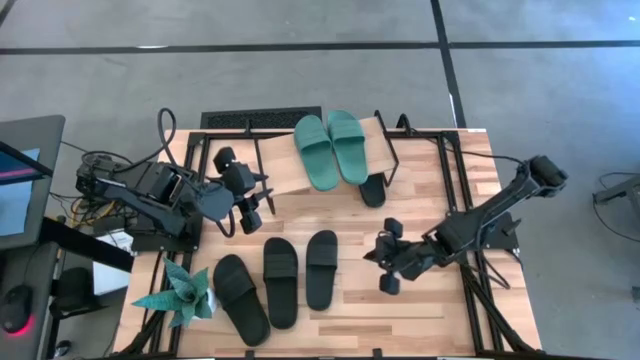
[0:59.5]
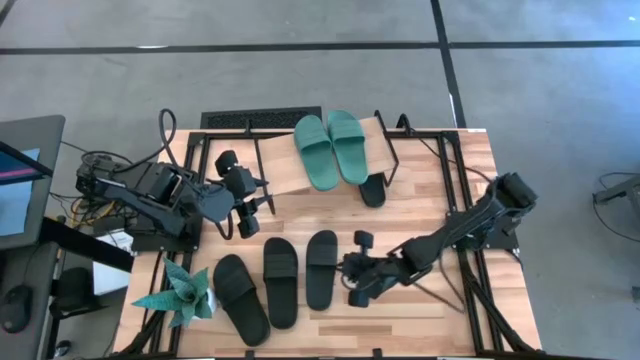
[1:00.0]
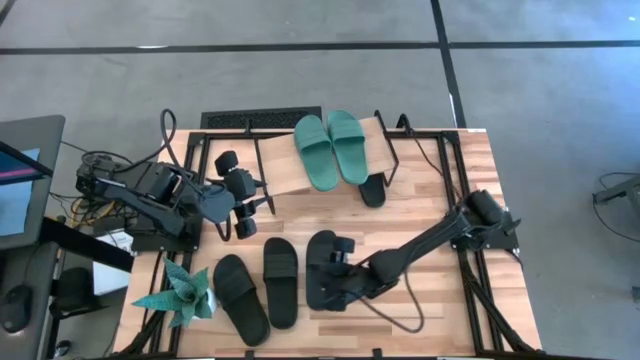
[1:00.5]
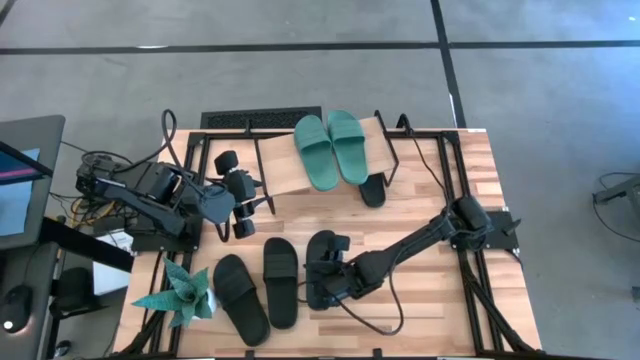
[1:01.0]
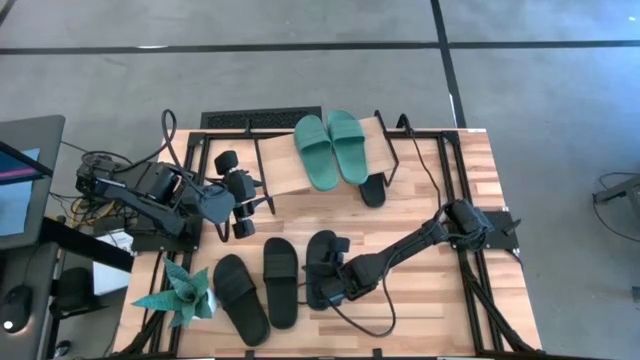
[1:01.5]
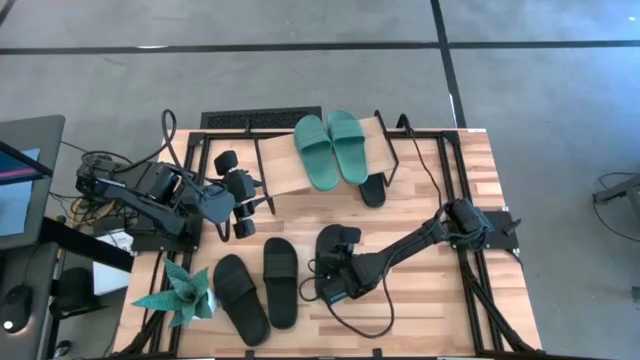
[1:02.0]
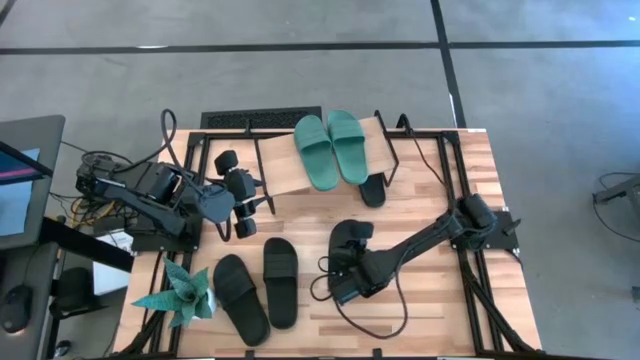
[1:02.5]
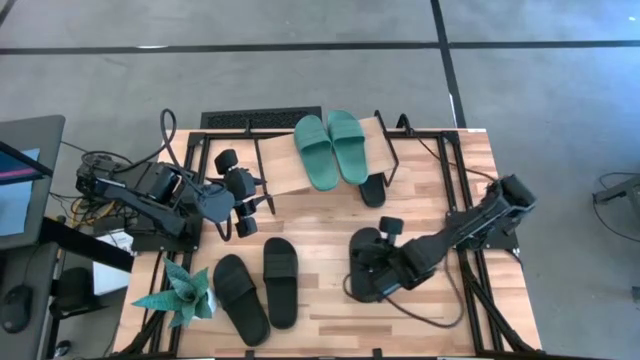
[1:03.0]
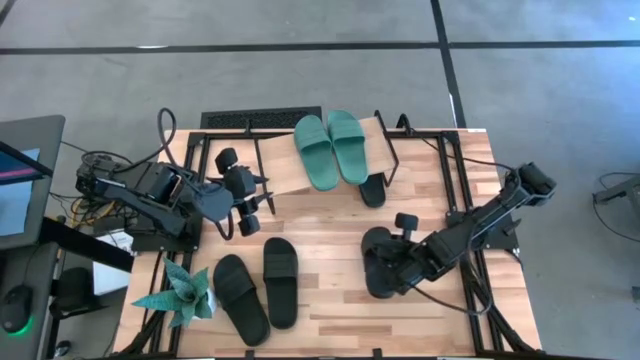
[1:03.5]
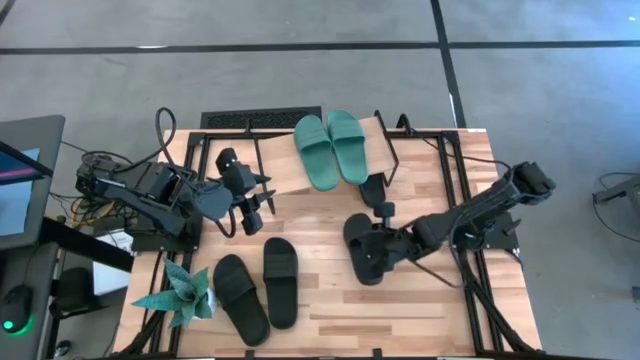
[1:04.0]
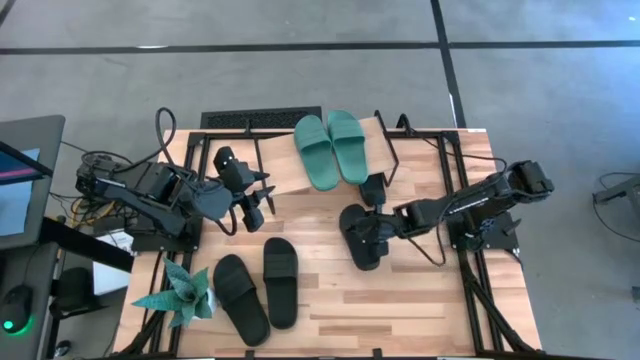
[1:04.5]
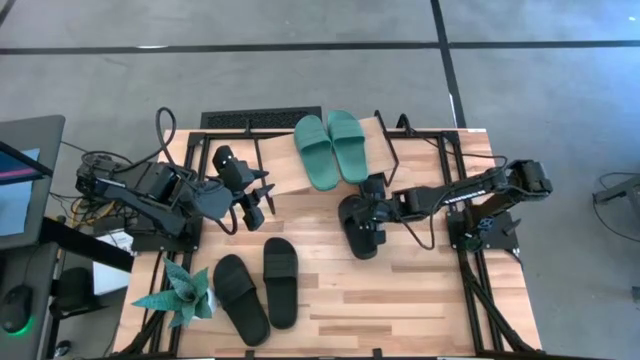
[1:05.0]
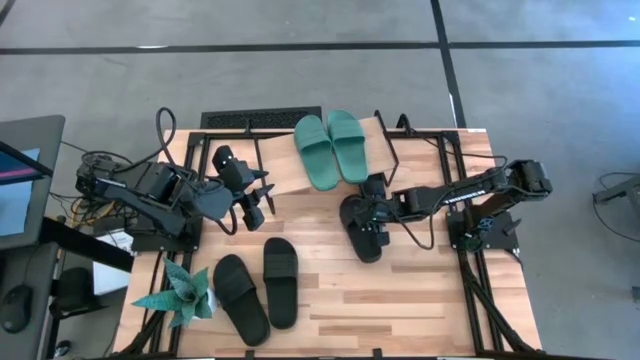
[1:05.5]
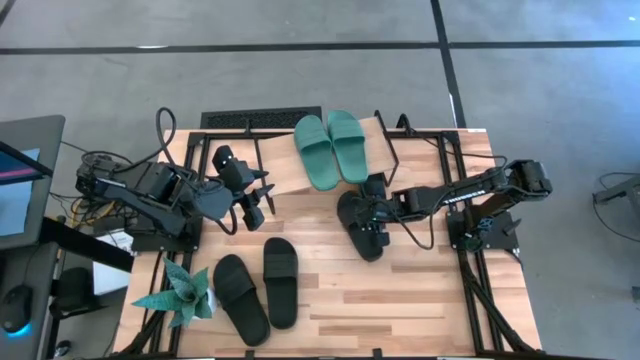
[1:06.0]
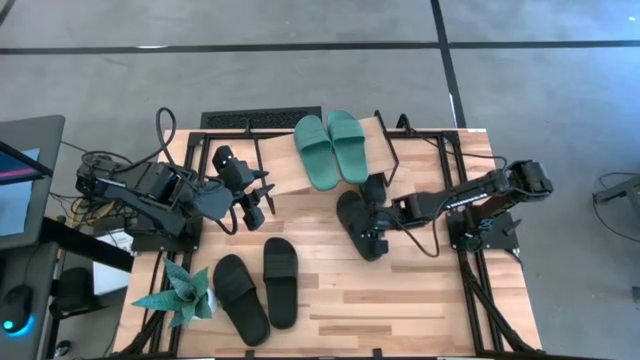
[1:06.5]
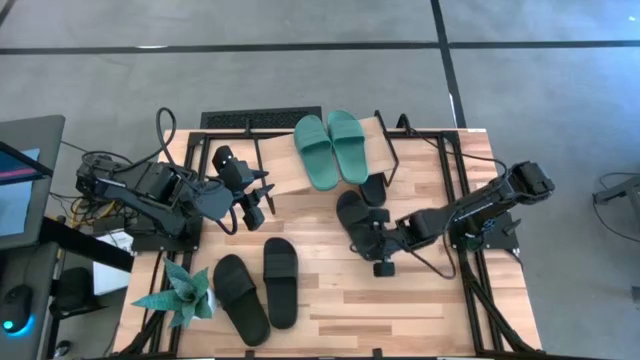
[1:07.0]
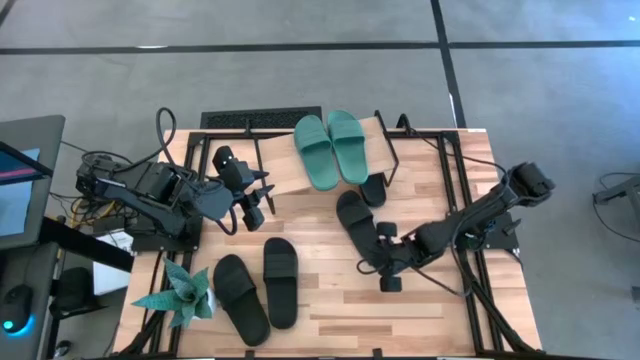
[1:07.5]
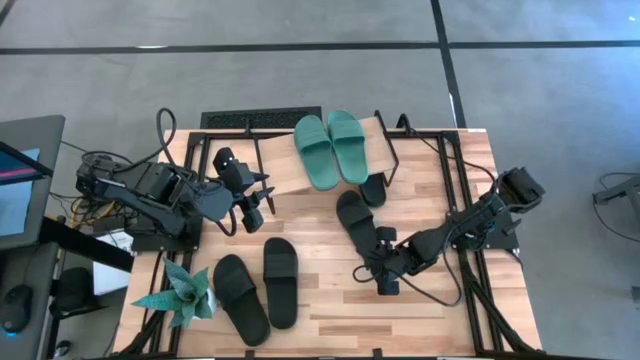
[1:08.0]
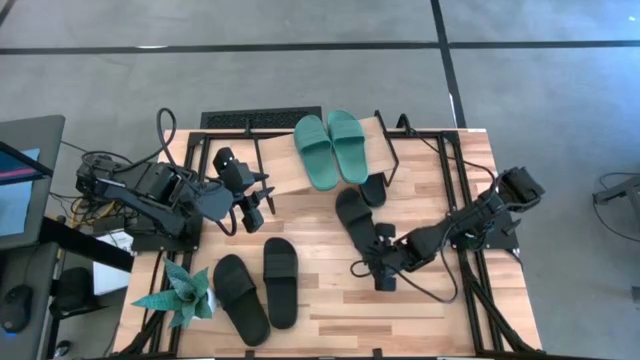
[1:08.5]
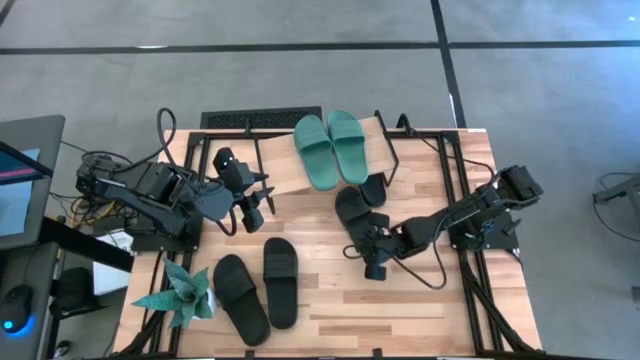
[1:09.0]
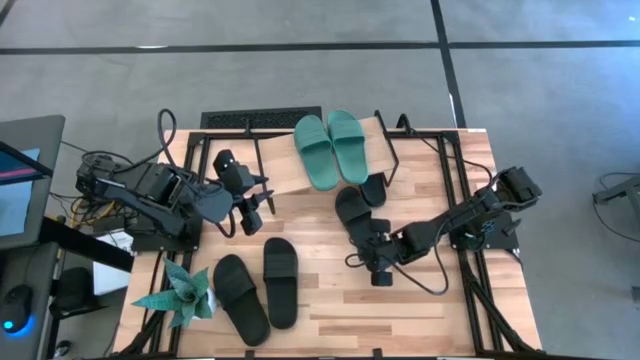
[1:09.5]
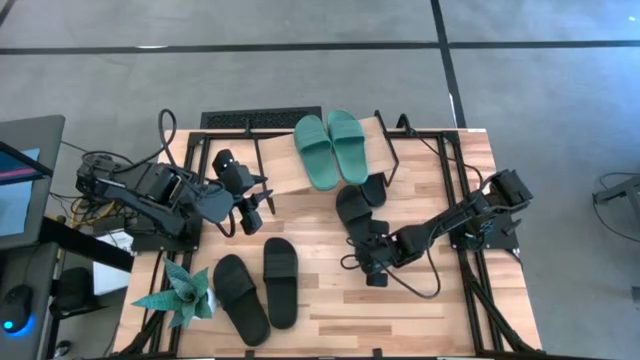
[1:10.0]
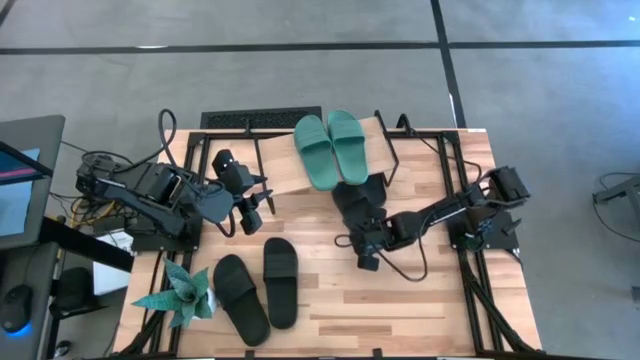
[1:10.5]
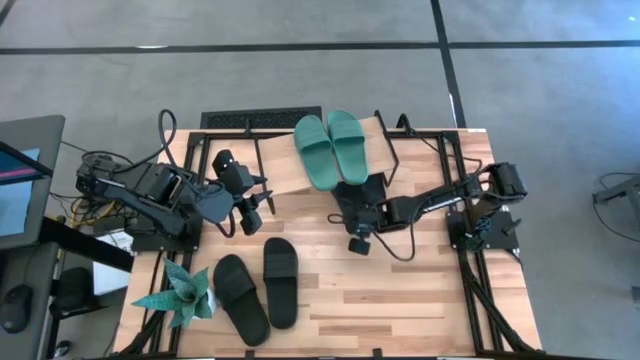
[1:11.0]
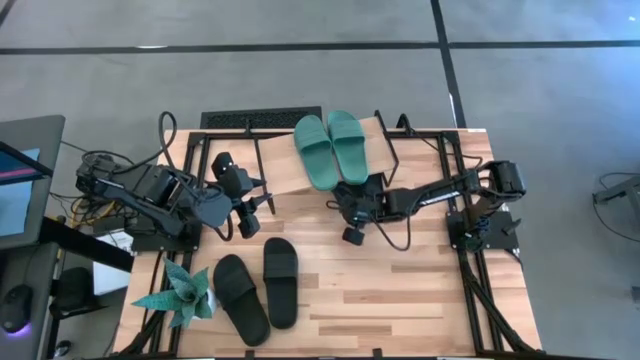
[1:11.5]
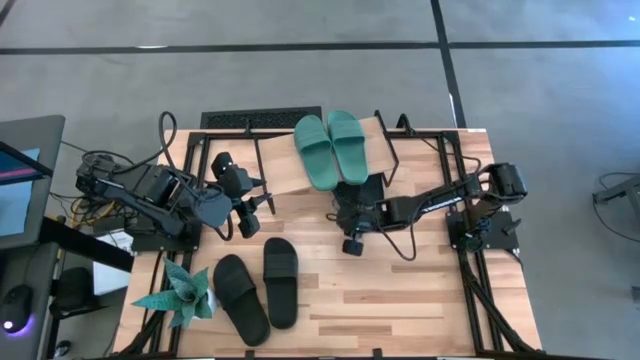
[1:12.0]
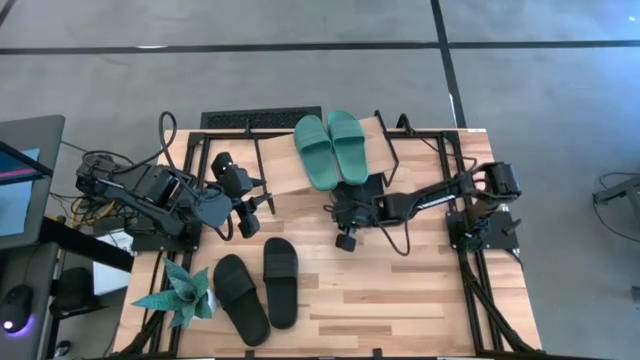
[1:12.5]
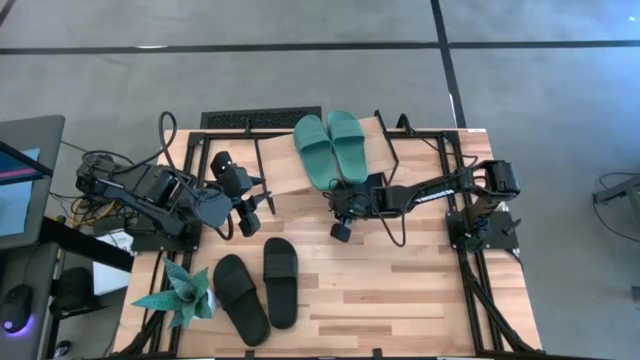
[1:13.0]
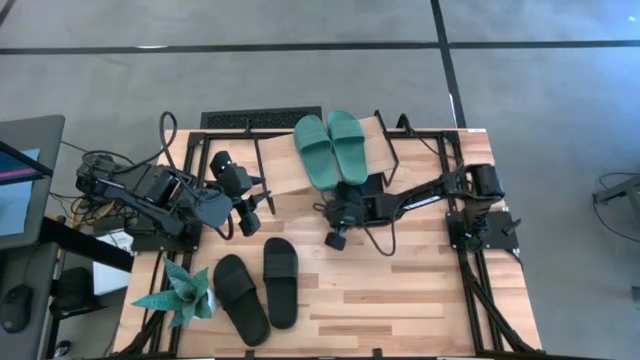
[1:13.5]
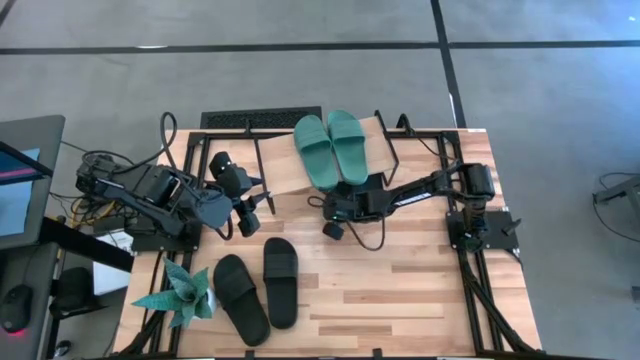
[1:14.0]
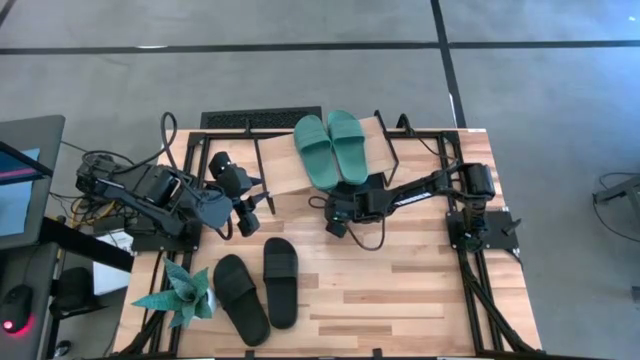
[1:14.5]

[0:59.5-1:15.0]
Task: Pick and place slides into the shelf
Put the black slide under the shelf

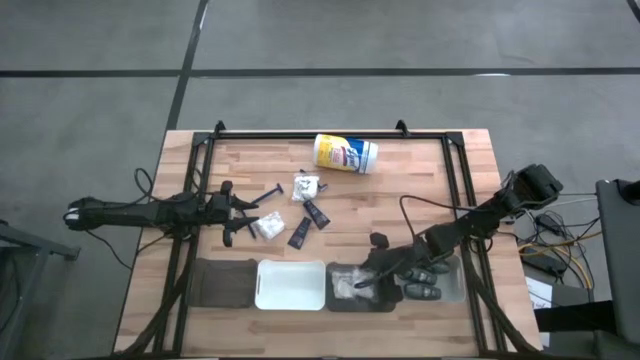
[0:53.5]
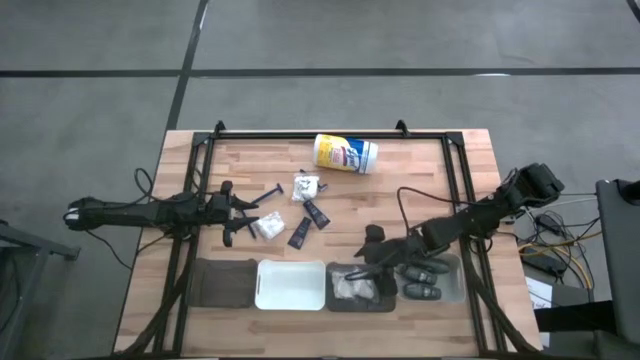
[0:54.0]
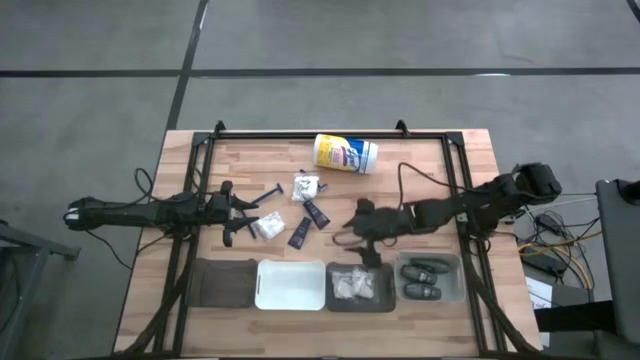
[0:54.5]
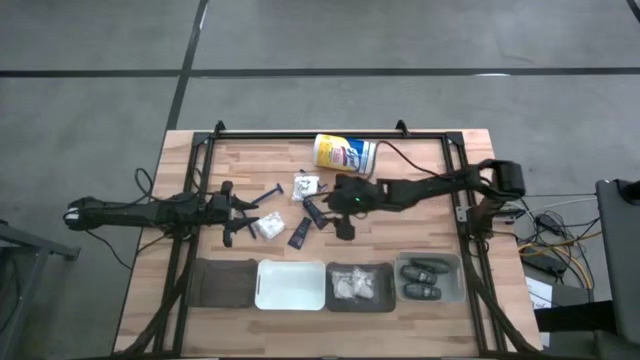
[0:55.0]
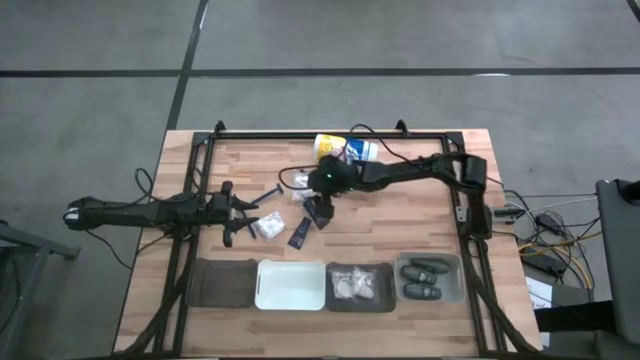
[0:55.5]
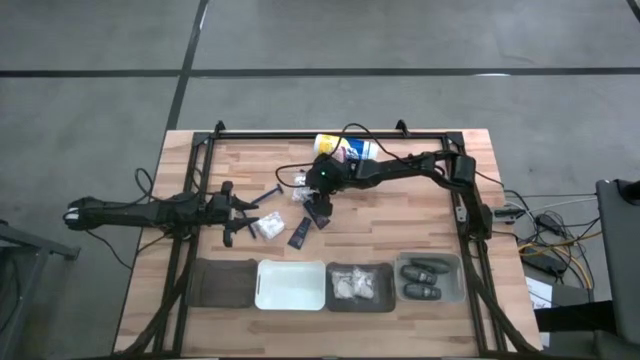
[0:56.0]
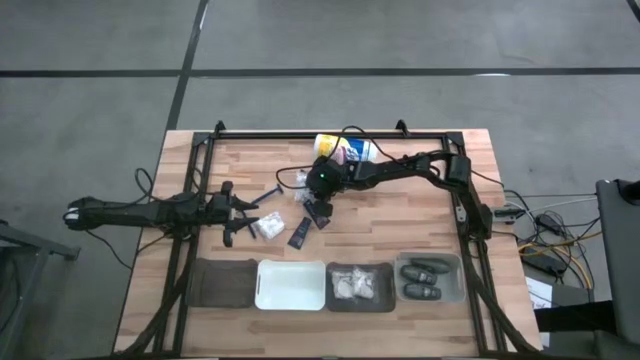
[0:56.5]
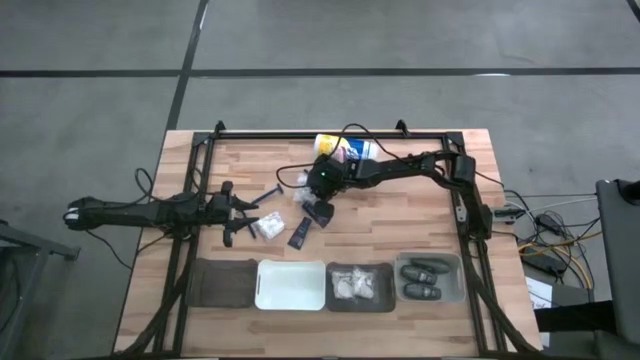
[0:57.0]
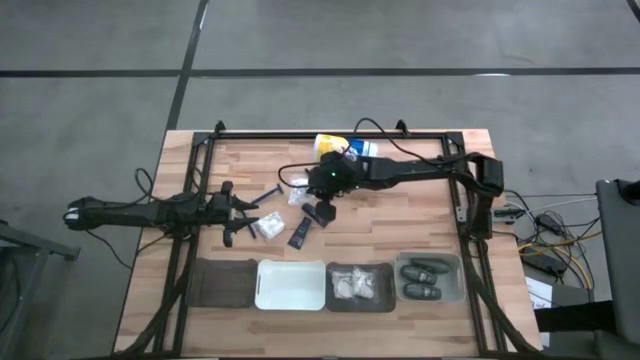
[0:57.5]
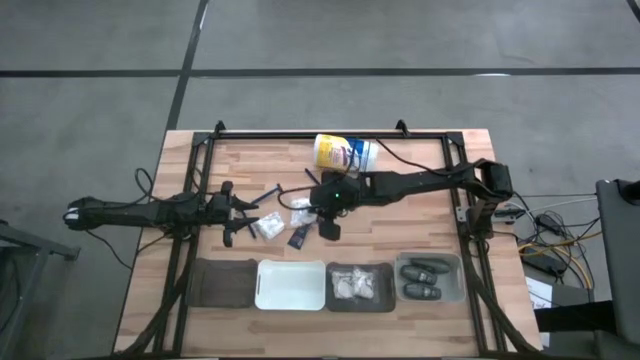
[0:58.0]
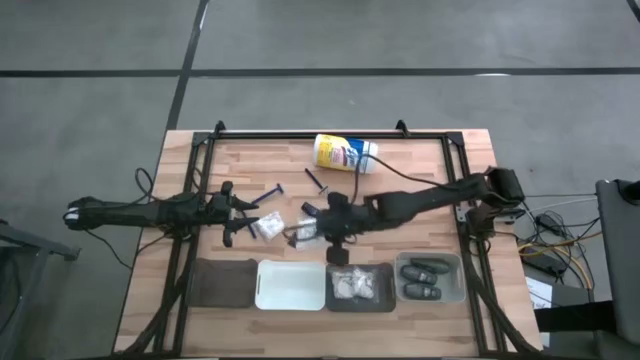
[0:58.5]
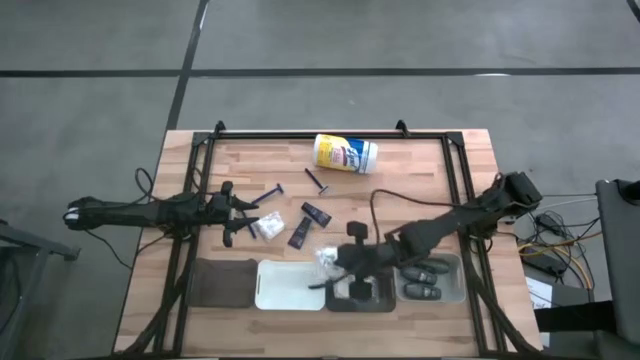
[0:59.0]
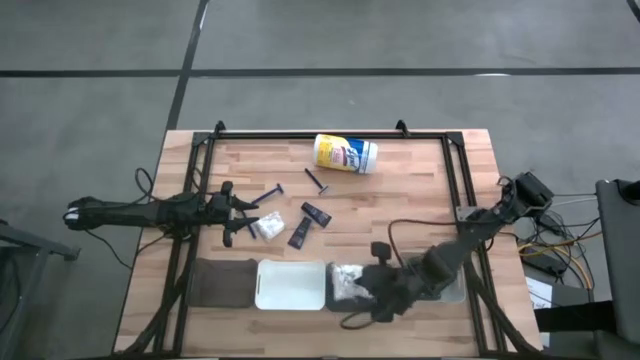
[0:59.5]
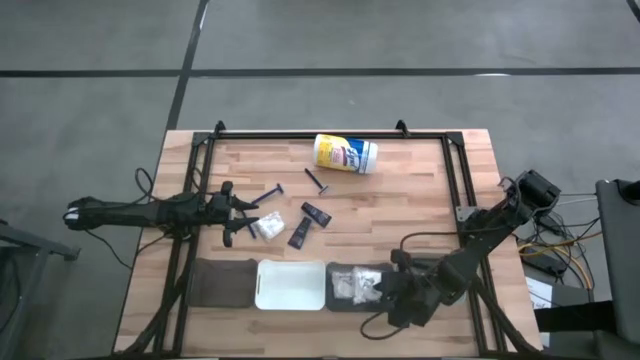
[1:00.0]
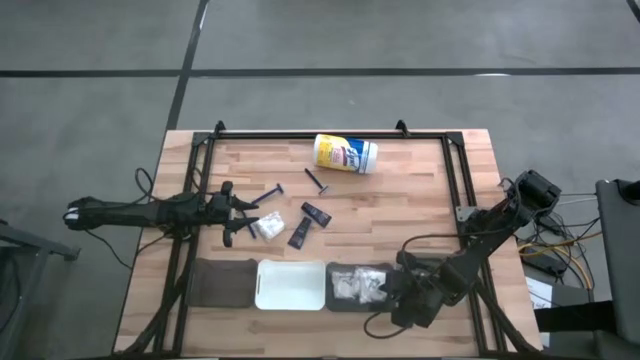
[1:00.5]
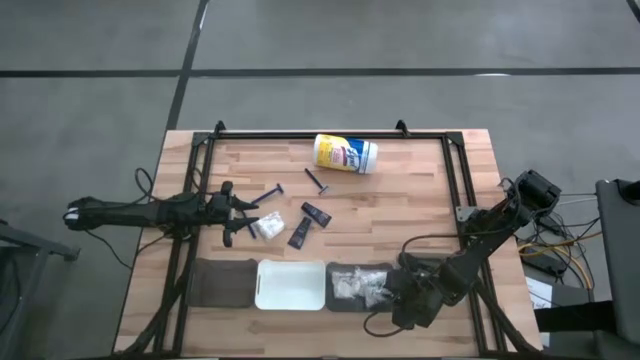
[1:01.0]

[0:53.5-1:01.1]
Task: Pick & Place Travel size toiletries
Put the cotton pack into the right black bin
